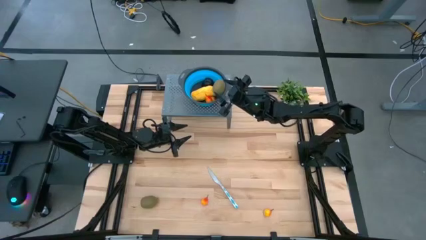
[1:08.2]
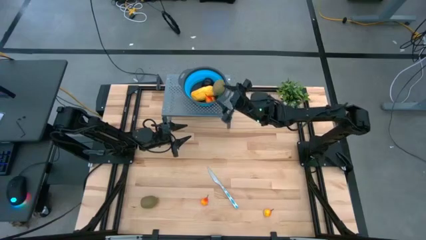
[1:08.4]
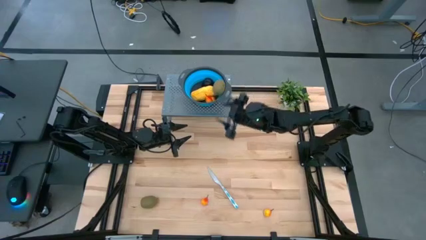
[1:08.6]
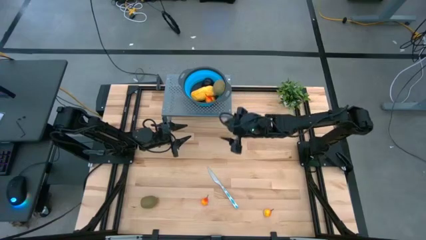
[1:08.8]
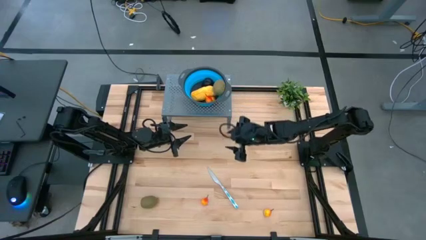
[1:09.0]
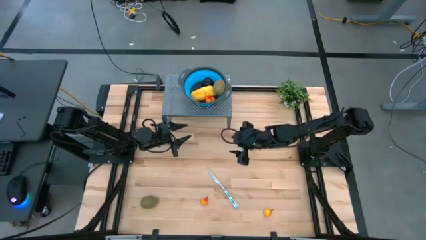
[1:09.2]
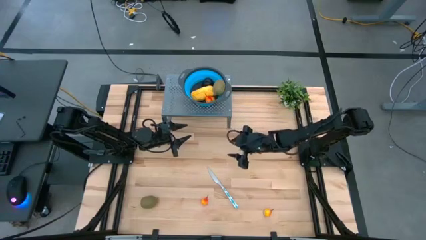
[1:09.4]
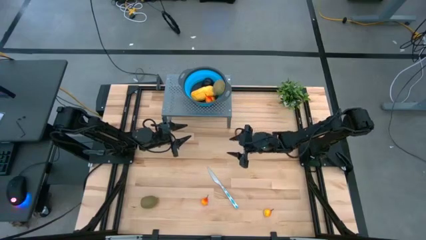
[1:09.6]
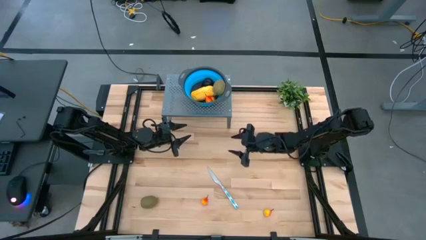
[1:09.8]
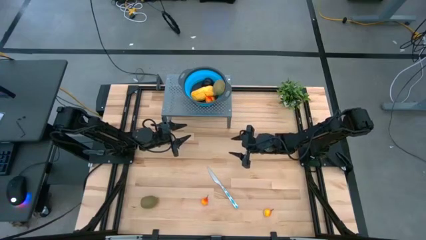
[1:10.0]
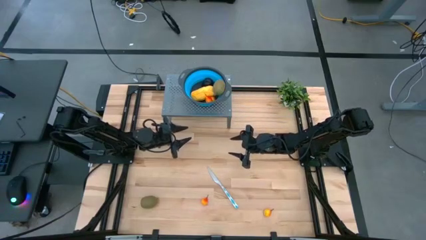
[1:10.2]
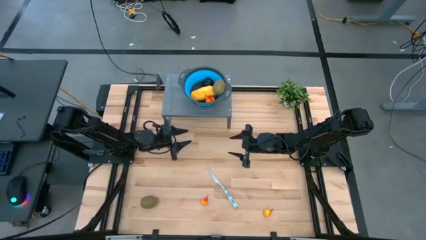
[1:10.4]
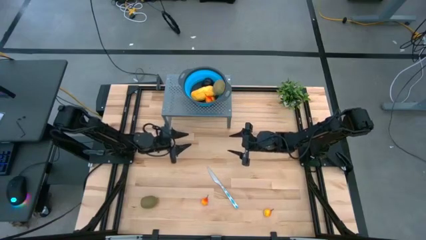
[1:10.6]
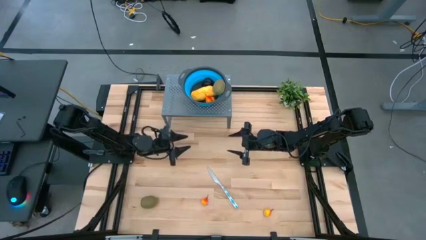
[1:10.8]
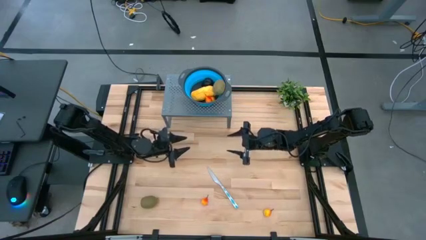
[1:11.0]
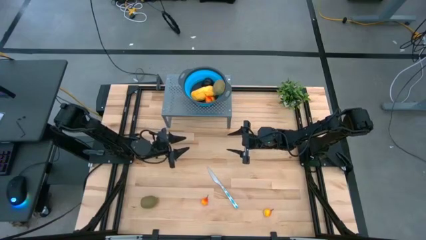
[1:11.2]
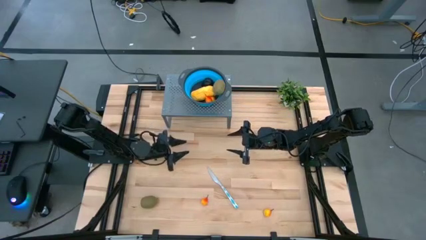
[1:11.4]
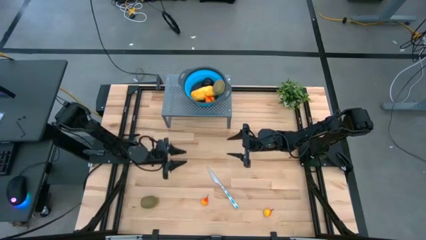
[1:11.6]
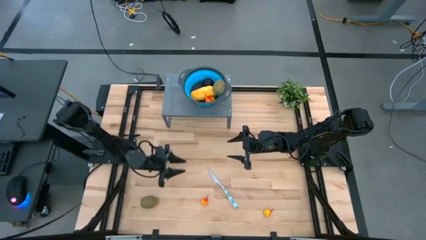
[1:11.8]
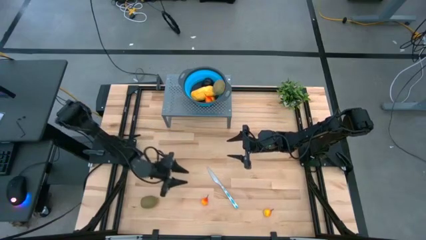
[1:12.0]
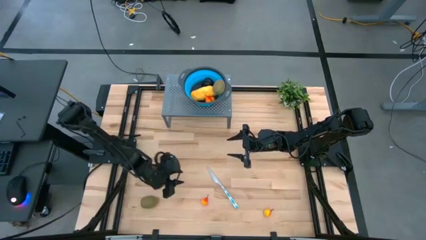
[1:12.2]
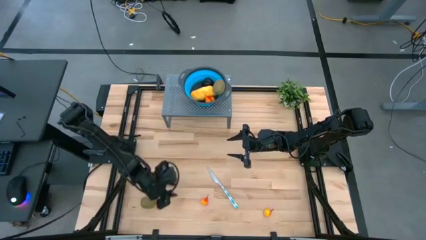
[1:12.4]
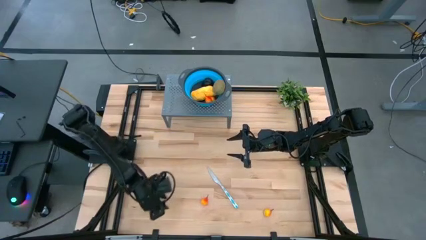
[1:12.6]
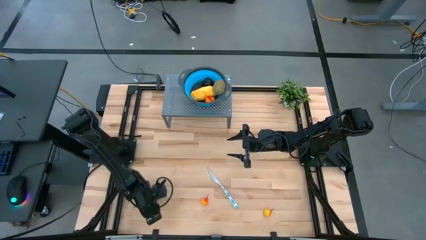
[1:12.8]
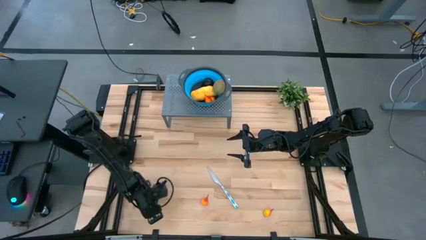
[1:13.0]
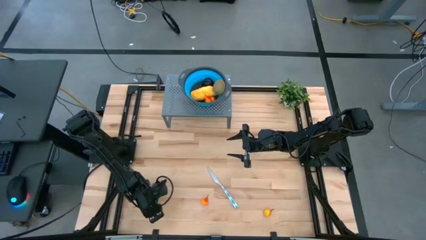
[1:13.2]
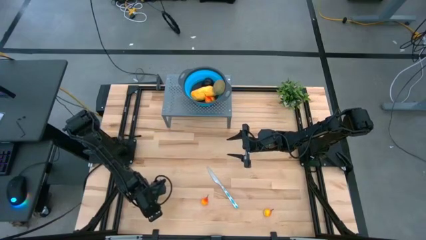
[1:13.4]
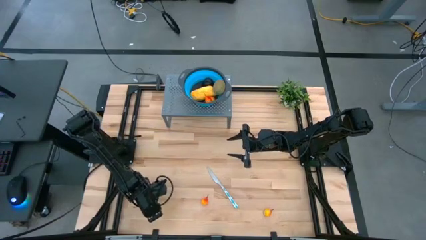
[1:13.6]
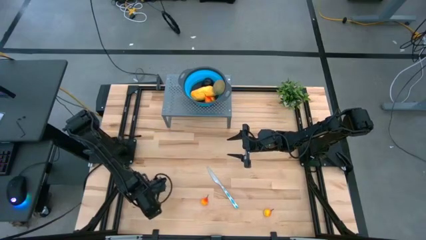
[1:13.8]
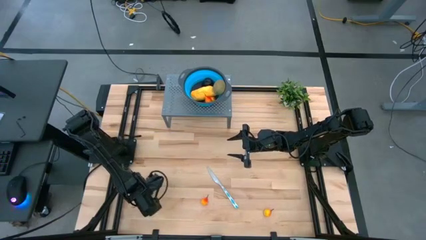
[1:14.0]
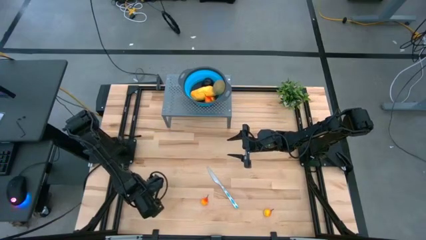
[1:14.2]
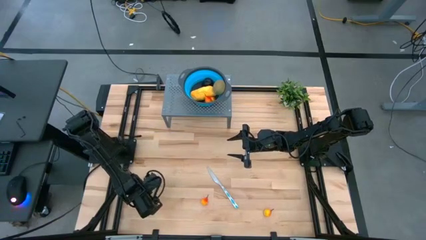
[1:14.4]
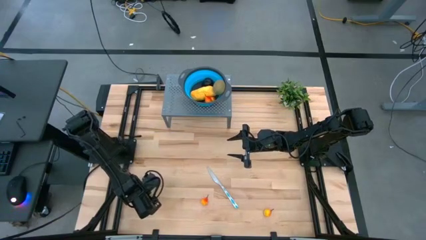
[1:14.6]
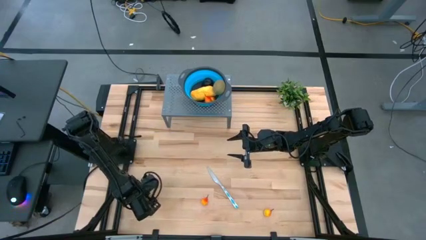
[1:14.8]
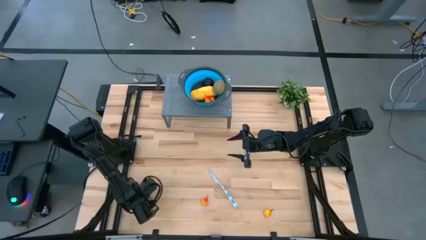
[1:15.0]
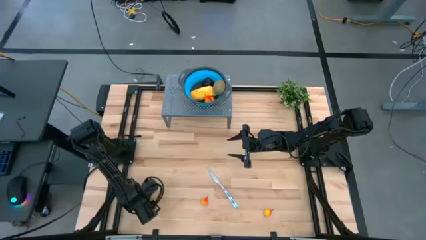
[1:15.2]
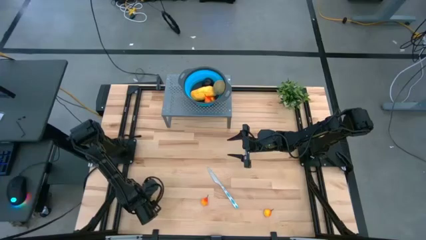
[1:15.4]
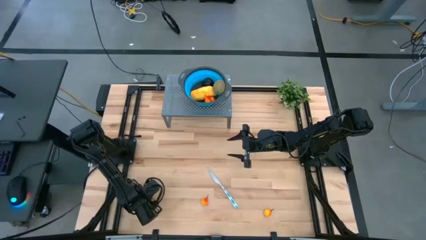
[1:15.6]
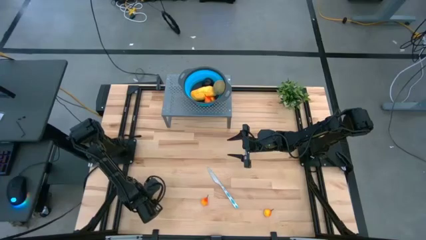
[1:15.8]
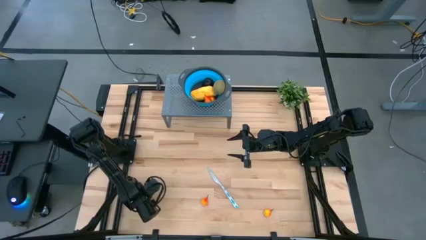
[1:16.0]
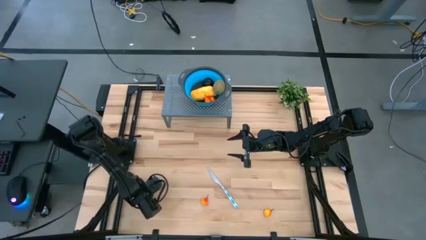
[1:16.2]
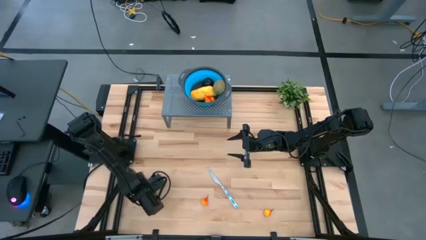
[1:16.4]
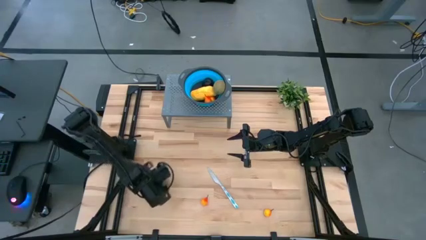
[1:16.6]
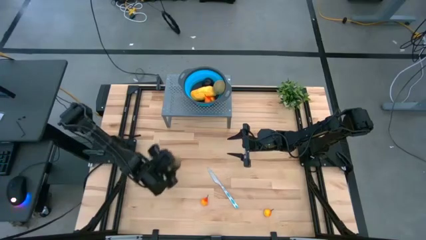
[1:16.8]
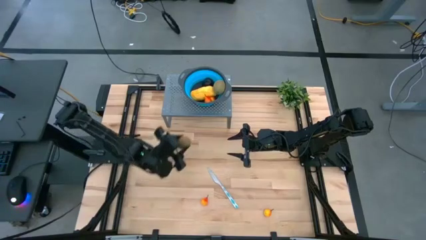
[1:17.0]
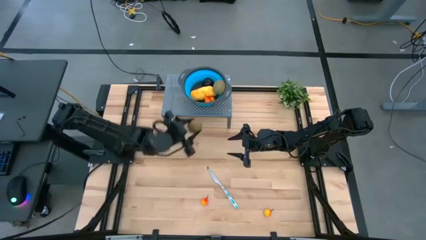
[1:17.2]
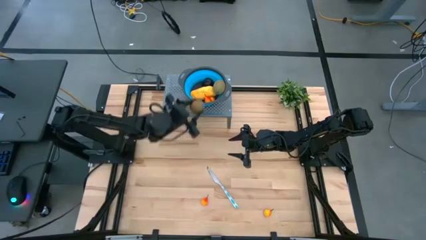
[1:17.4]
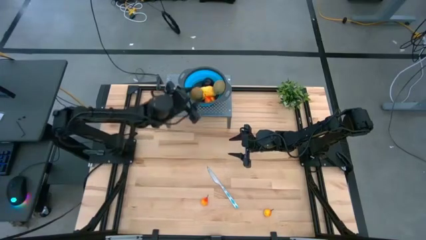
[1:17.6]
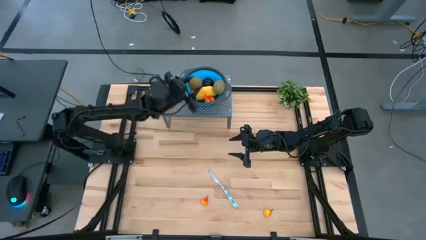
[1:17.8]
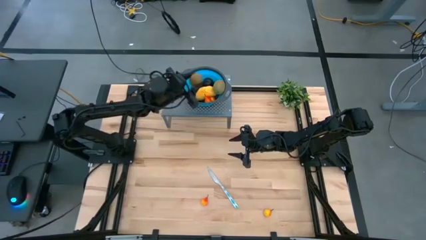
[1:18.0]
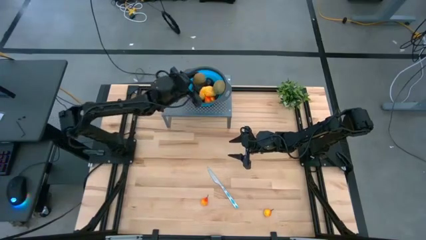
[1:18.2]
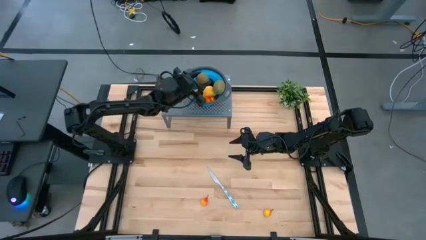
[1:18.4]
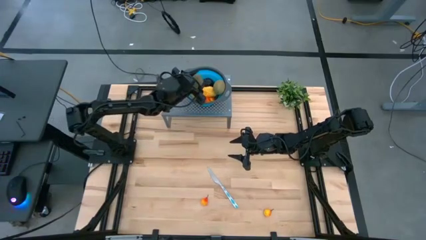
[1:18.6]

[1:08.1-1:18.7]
Task: Pick & Place Fruit
Put the brown kiwi into the blue strainer bowl on the shelf

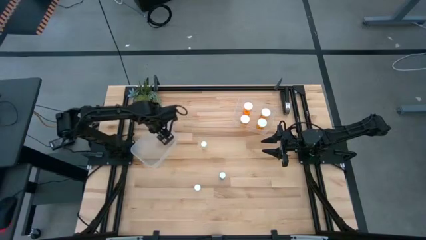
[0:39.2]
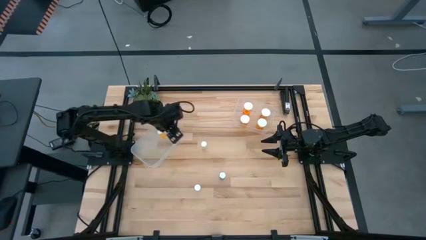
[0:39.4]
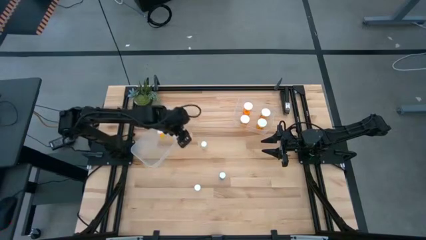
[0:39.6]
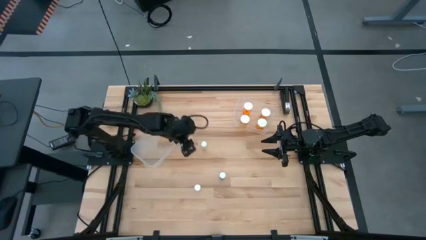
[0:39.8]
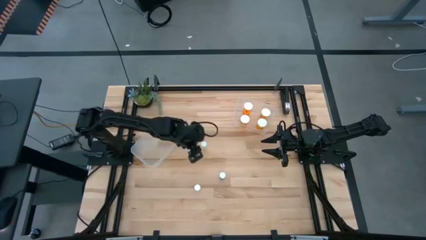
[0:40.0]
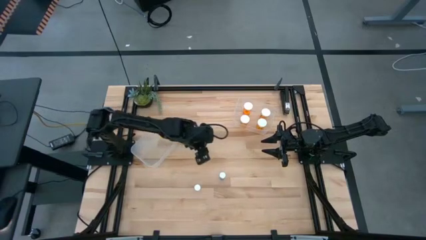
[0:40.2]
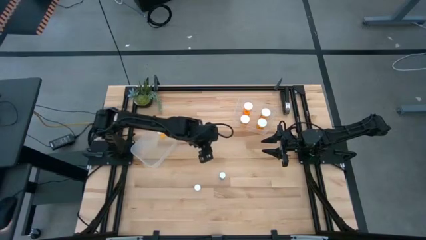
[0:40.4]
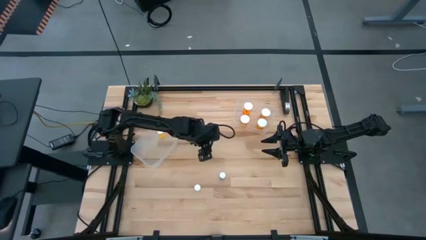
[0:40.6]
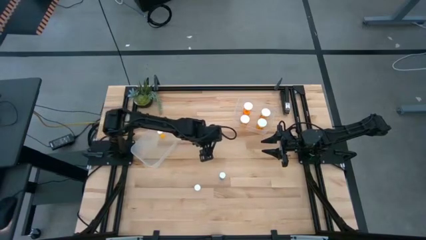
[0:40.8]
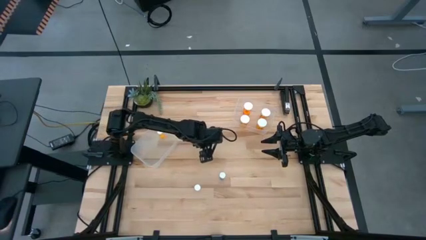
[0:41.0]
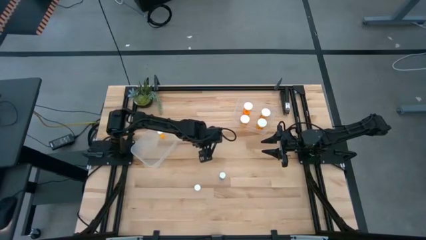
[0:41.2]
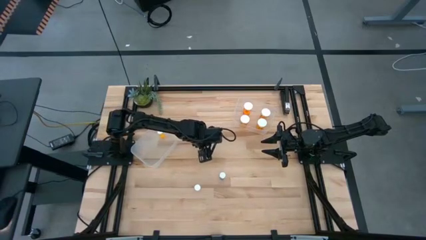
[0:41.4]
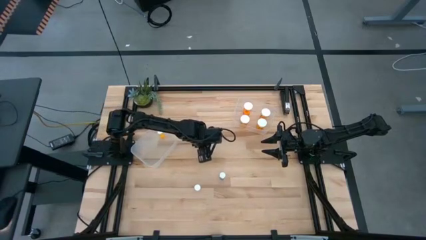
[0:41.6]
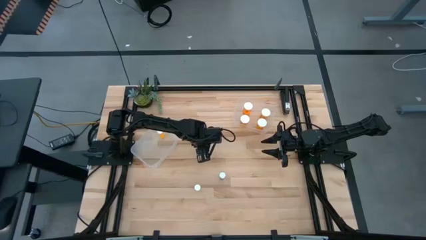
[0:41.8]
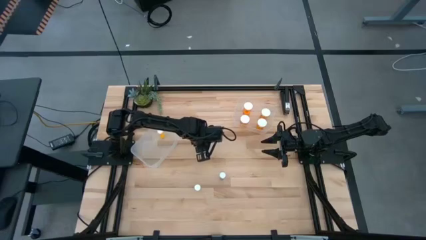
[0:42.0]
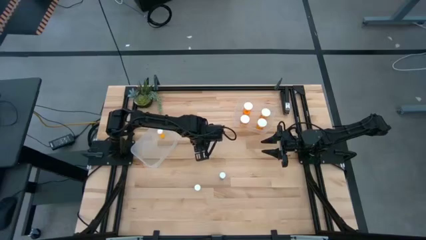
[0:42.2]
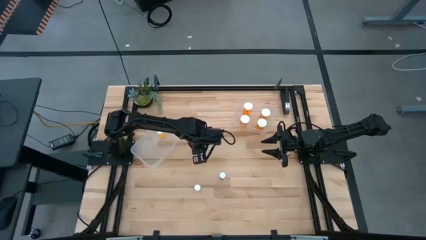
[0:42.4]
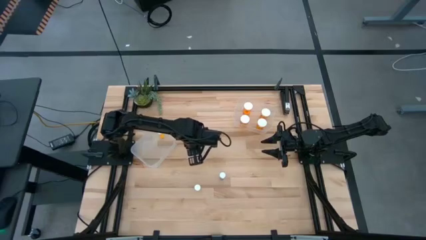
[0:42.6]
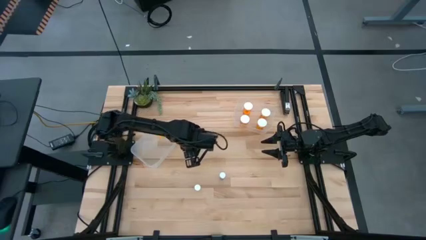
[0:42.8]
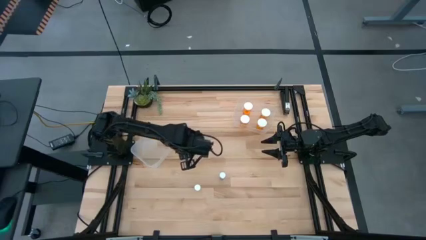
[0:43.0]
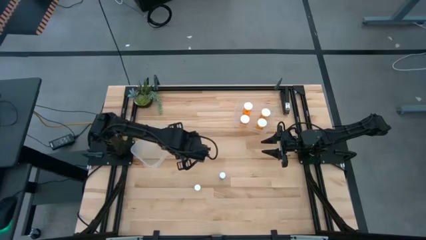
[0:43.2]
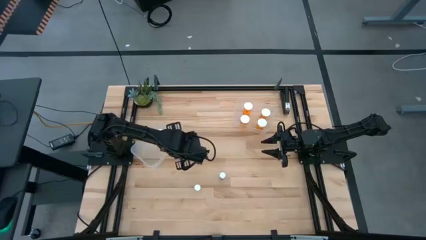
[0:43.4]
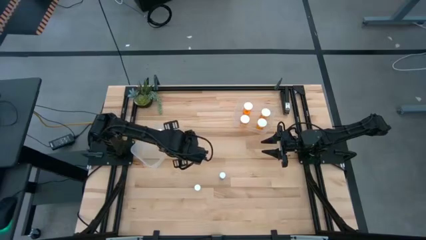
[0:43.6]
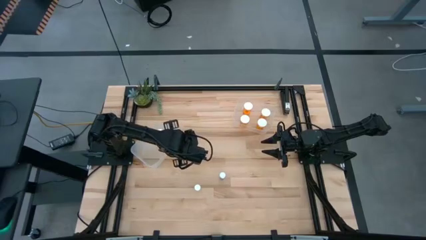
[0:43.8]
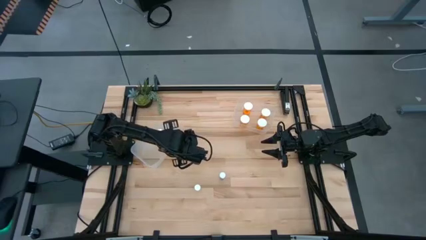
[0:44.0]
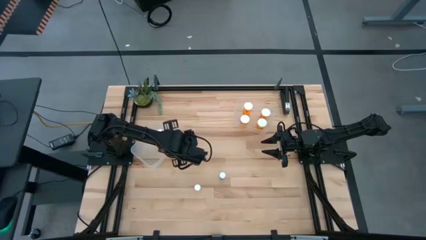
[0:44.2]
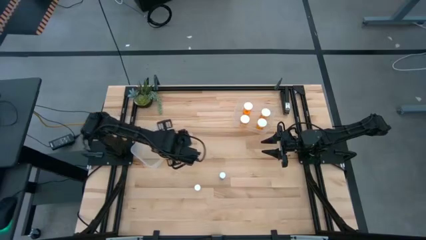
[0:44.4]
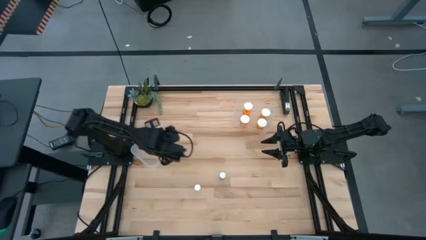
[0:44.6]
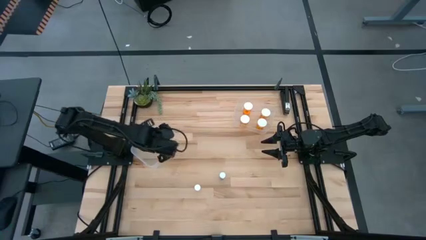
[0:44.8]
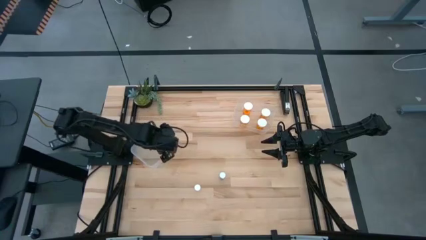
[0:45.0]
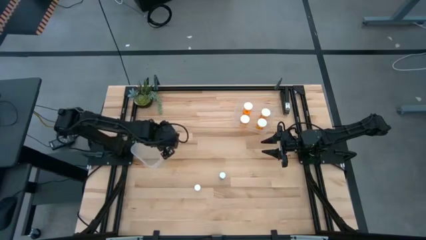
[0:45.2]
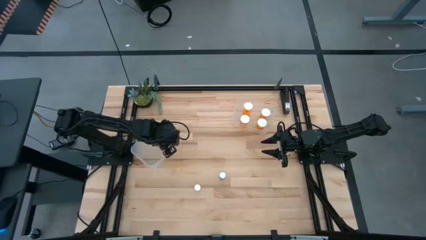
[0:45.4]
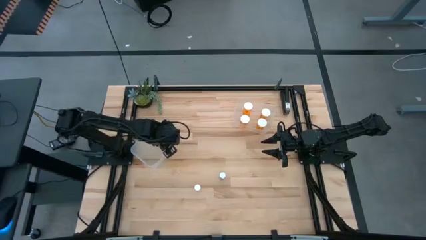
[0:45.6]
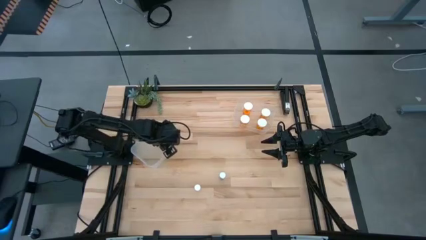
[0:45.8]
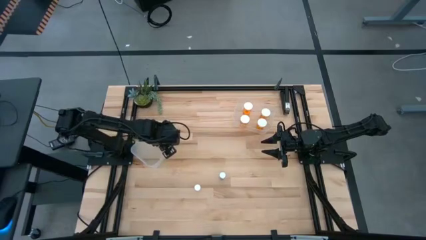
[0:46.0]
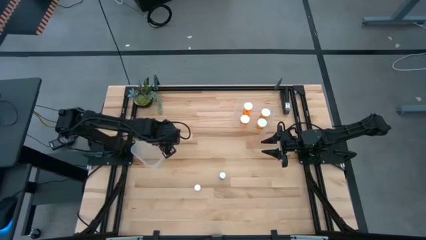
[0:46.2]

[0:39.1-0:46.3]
Task: Pick and place medicine bottles into bin by pill shape (circle, oval)
Put the small yellow pill bottle into the left transparent bin
